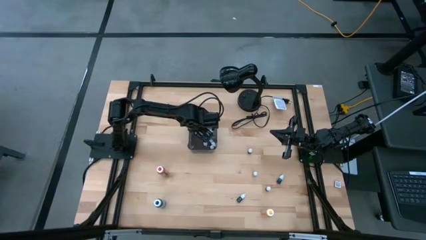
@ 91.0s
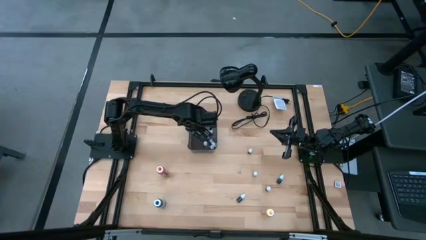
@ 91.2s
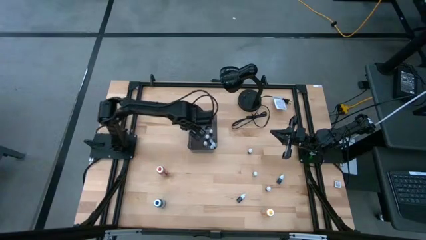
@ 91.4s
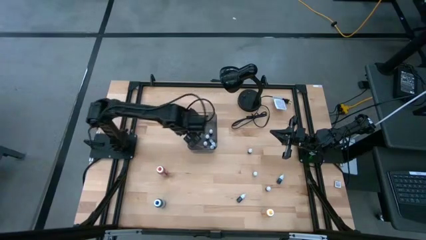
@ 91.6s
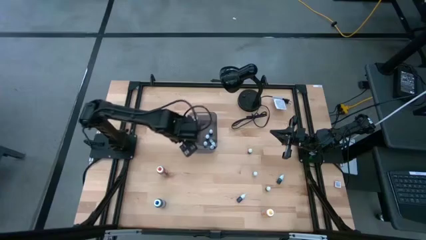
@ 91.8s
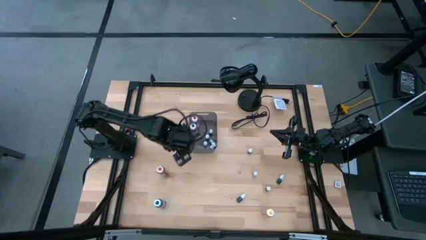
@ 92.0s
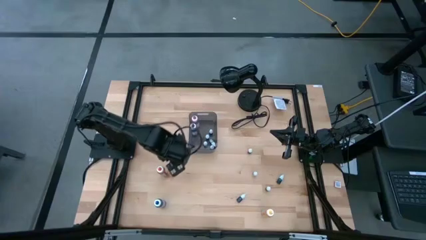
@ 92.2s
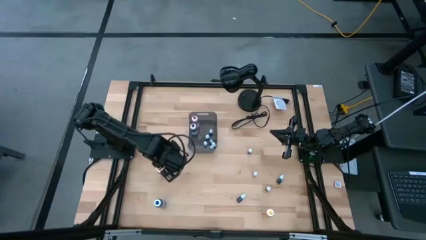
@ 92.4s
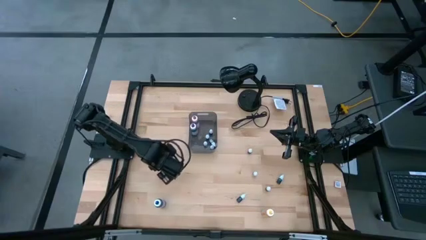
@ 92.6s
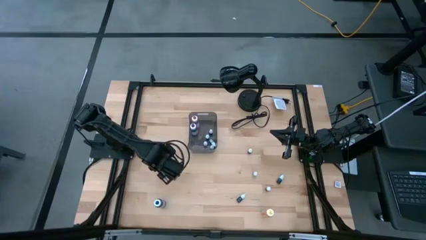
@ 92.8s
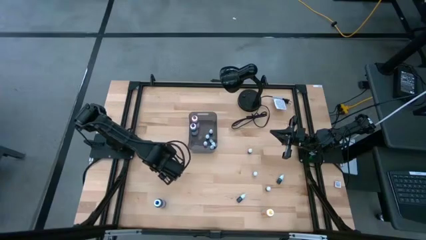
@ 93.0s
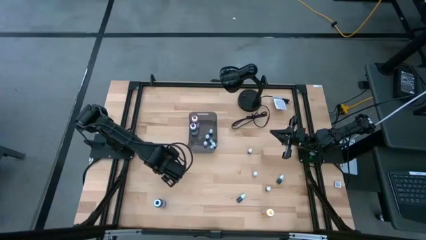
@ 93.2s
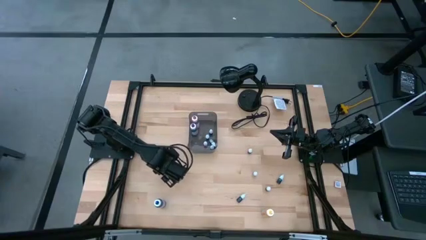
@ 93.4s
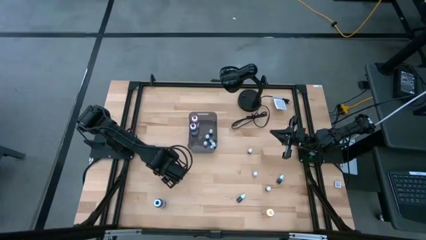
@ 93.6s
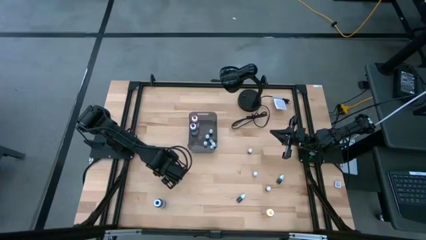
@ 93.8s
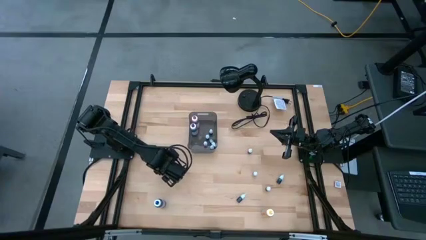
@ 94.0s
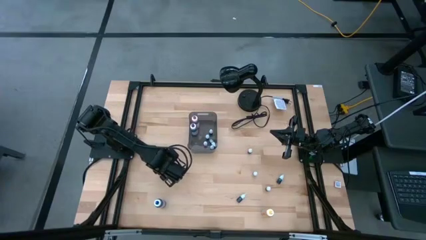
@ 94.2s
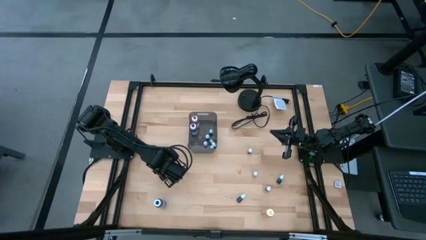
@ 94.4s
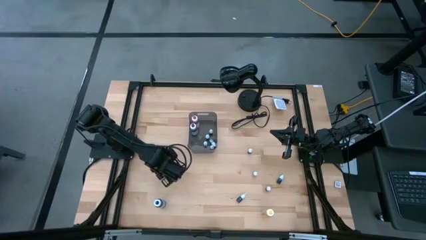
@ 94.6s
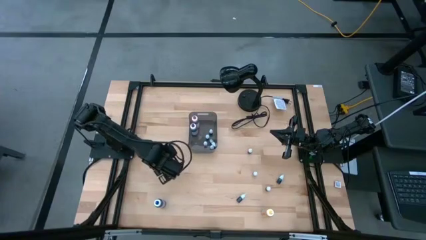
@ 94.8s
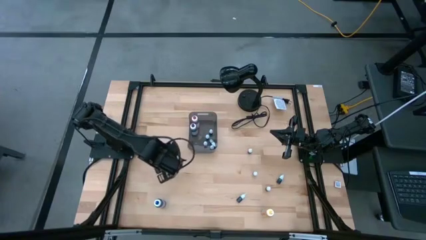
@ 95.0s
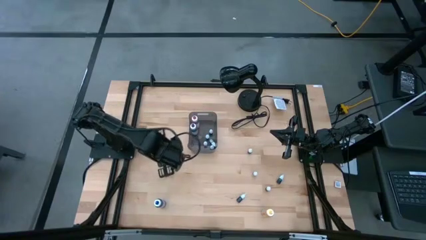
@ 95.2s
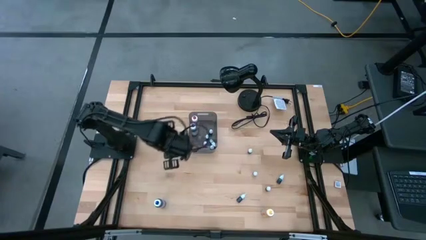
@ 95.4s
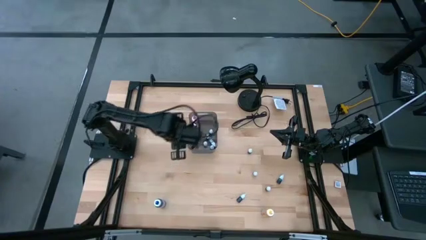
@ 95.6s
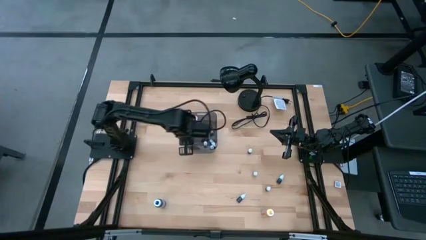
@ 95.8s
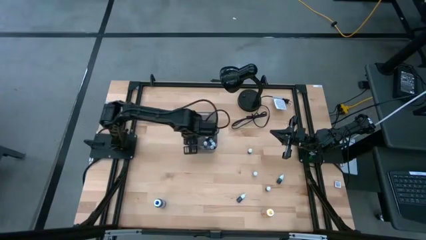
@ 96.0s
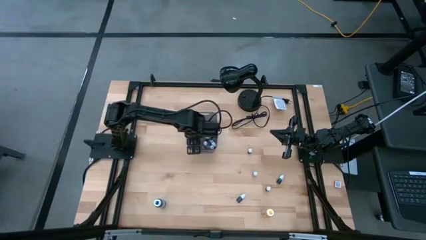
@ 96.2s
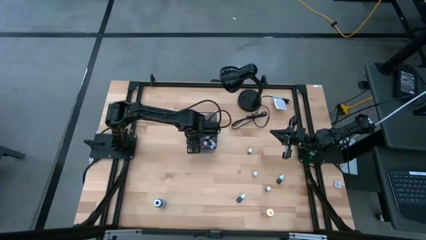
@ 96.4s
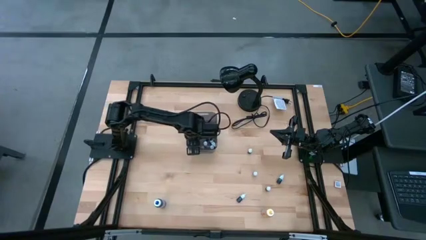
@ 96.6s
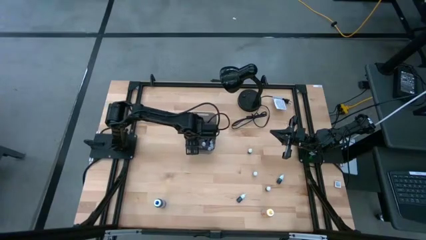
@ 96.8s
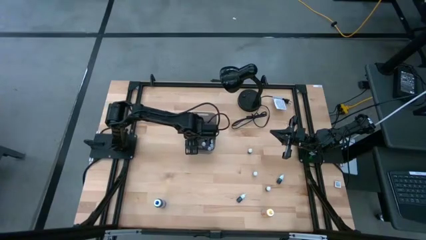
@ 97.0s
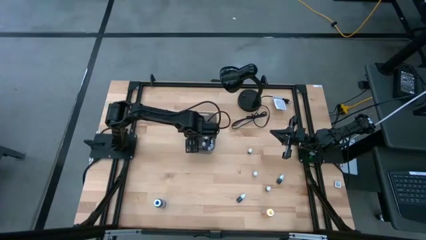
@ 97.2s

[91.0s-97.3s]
Task: Pick & Place food coloring
Put the big orange food coloring bottle into the gray transparent bin

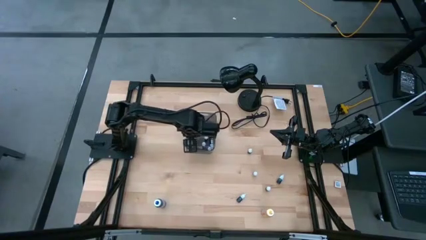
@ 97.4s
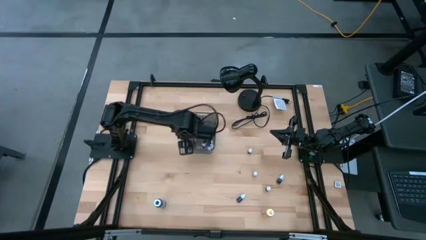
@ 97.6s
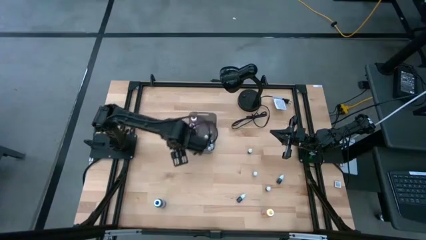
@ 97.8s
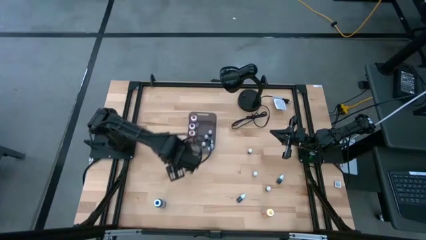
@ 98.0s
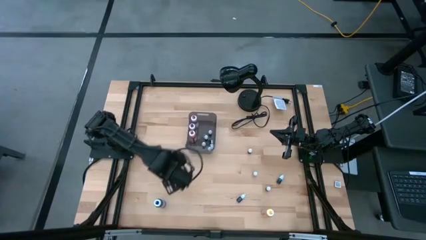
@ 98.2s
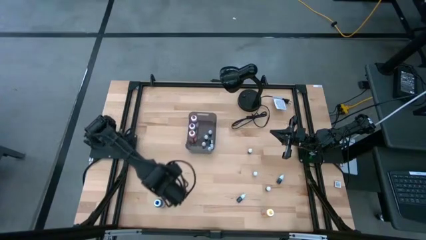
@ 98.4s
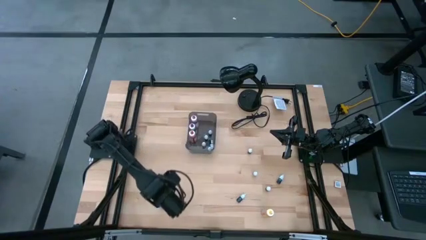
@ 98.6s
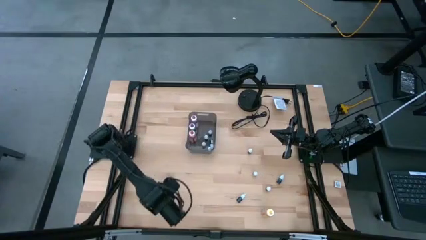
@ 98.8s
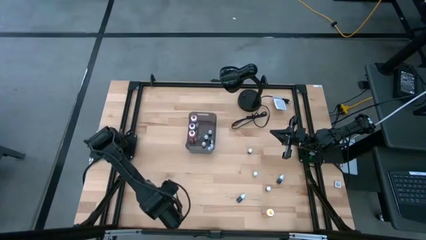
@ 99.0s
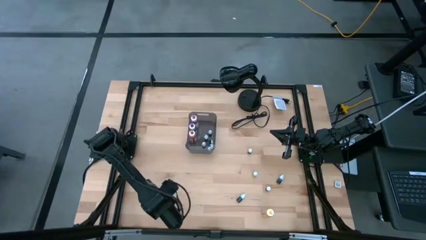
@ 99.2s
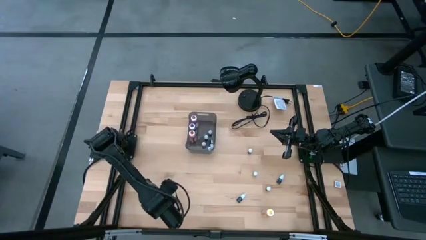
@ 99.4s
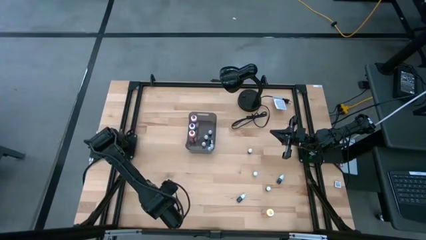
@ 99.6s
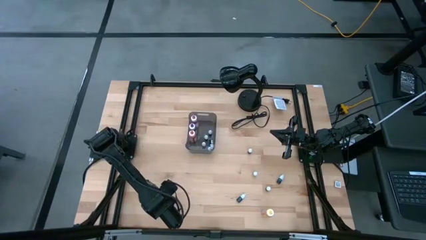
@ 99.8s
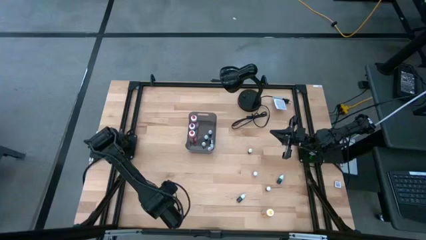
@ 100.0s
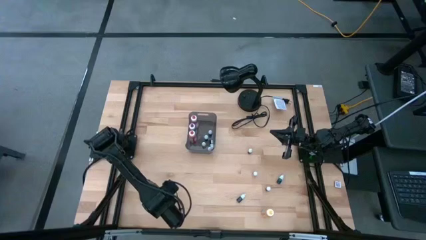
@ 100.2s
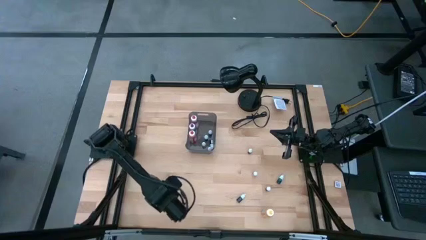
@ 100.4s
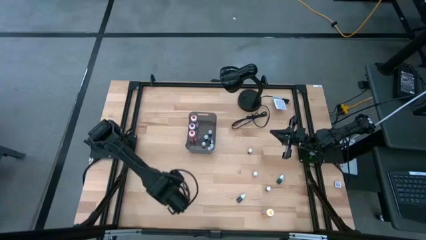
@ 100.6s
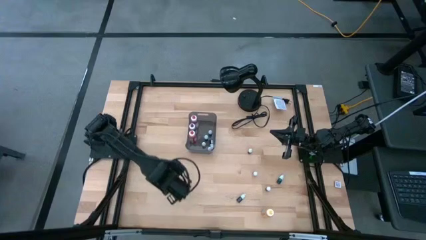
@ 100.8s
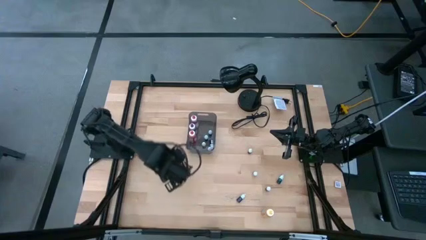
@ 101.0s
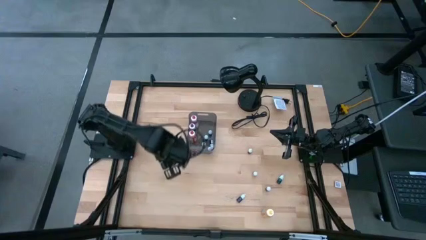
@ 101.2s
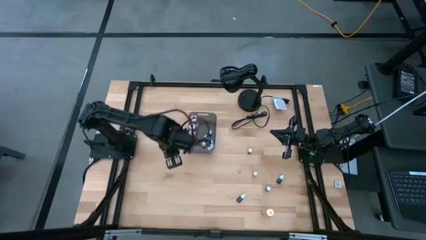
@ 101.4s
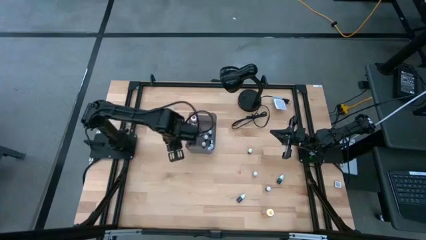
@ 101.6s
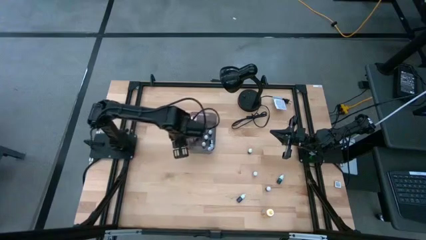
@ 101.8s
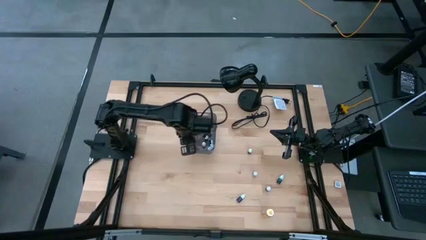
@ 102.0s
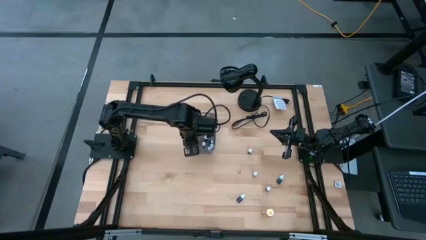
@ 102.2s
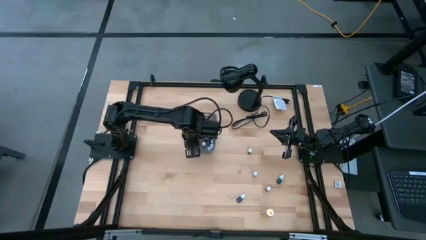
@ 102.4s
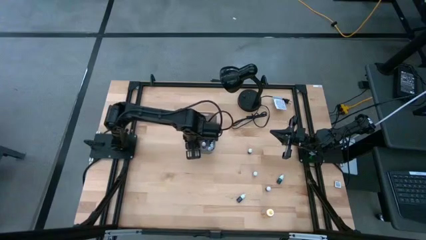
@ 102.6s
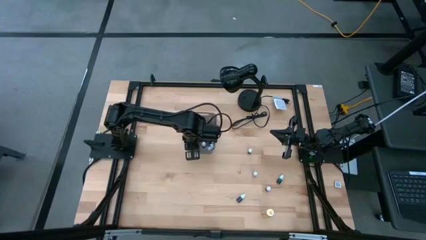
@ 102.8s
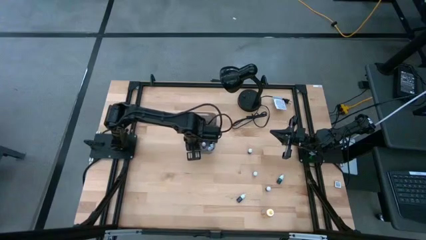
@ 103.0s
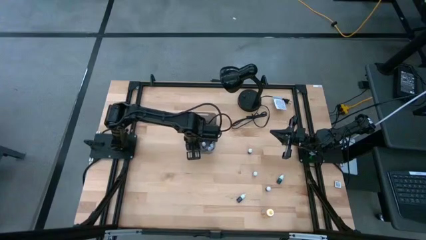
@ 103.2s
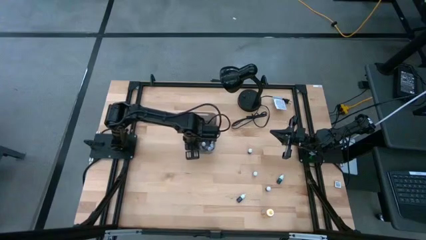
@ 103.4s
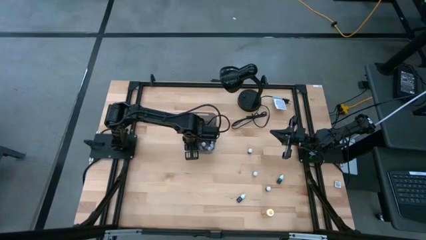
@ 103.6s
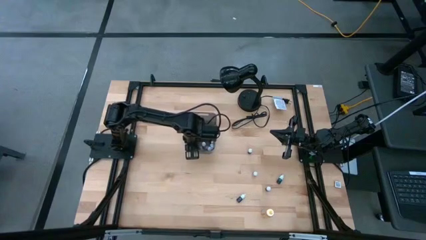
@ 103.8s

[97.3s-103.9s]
Put the big blue food coloring bottle into the gray transparent bin
